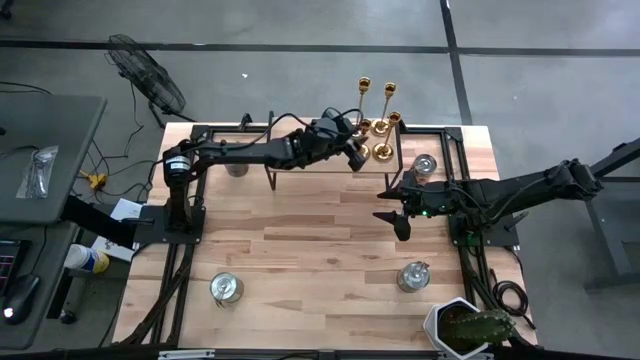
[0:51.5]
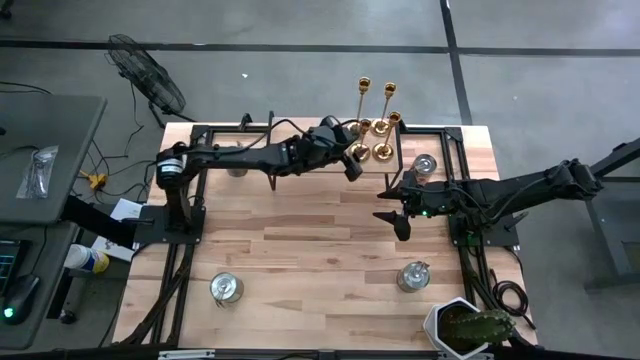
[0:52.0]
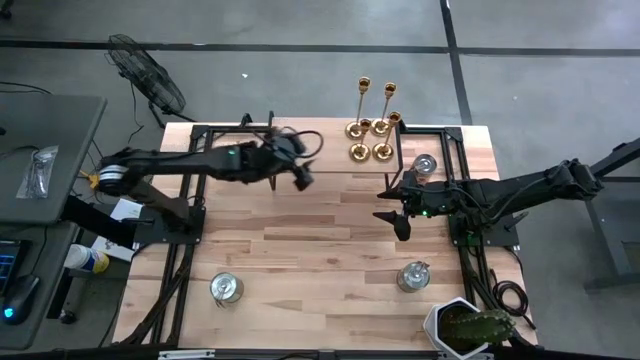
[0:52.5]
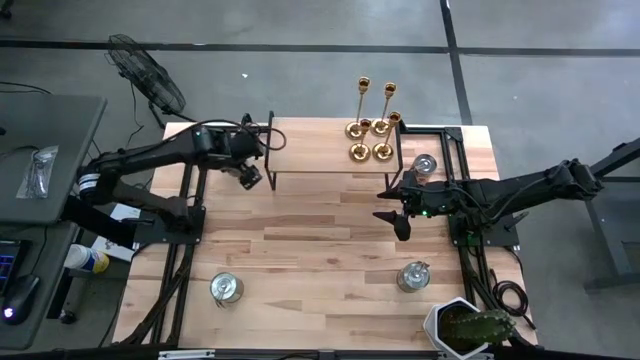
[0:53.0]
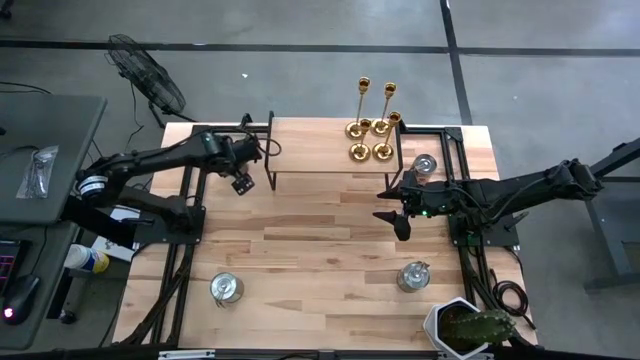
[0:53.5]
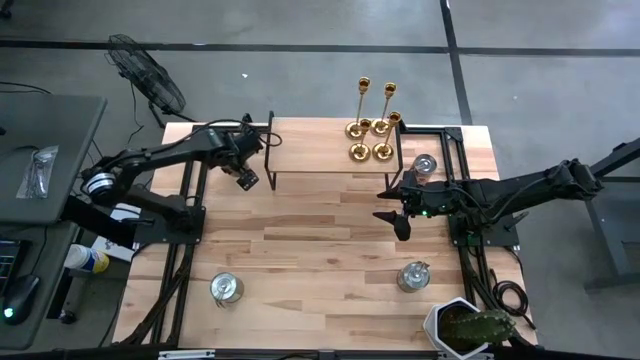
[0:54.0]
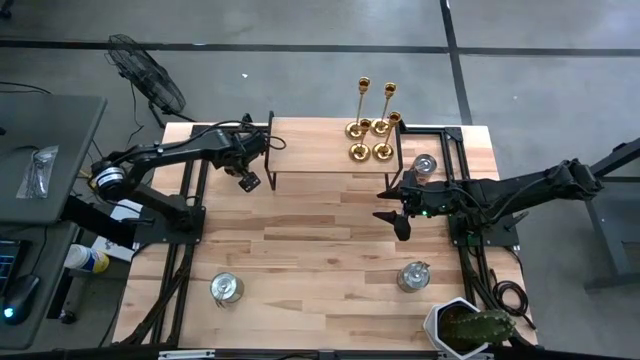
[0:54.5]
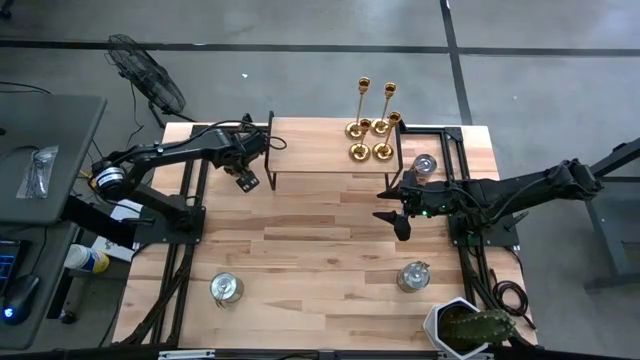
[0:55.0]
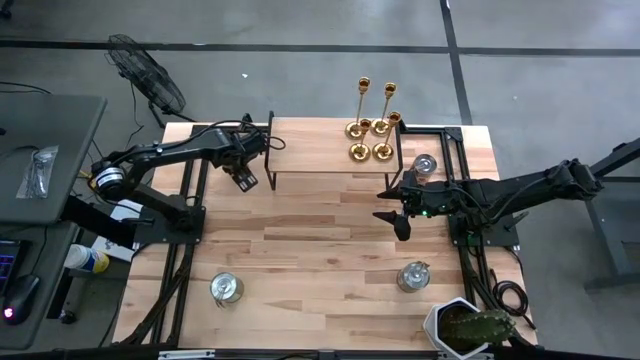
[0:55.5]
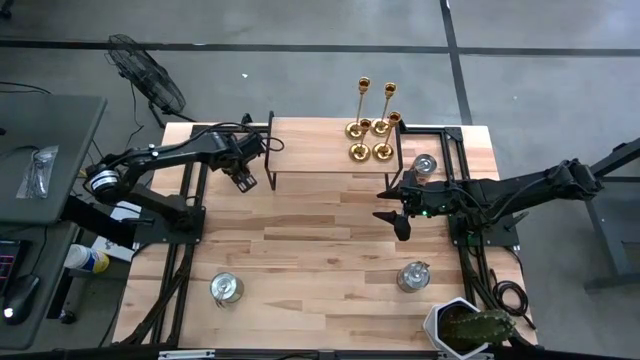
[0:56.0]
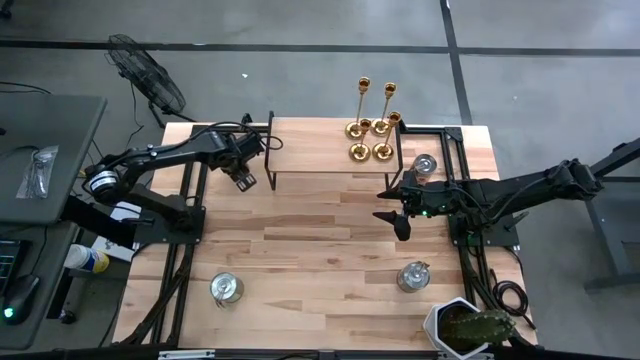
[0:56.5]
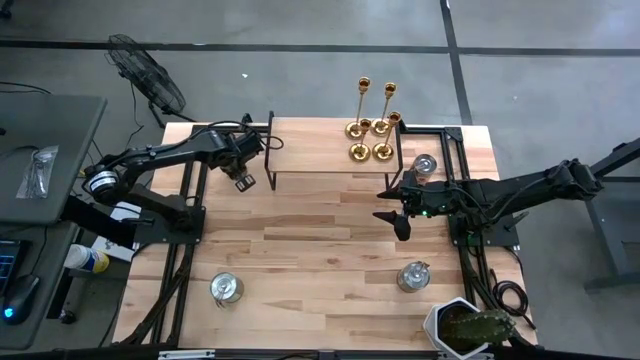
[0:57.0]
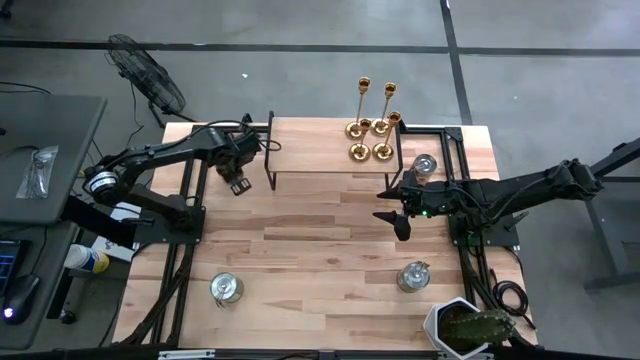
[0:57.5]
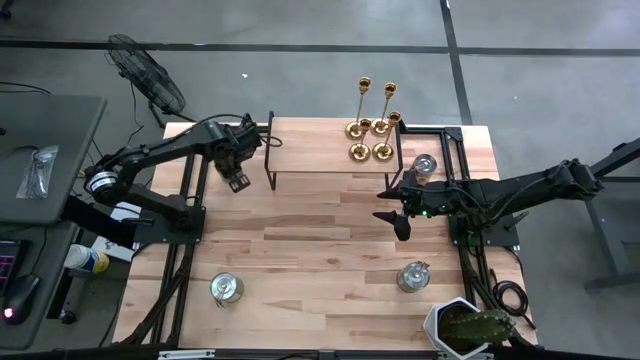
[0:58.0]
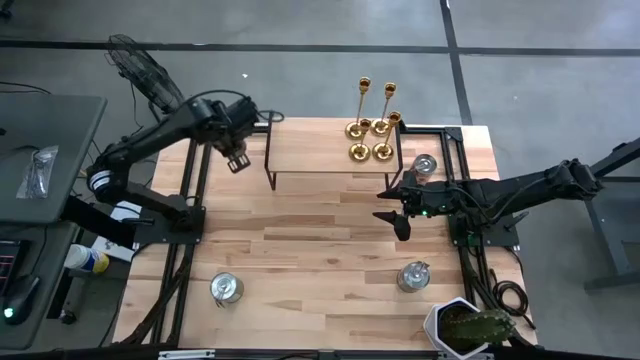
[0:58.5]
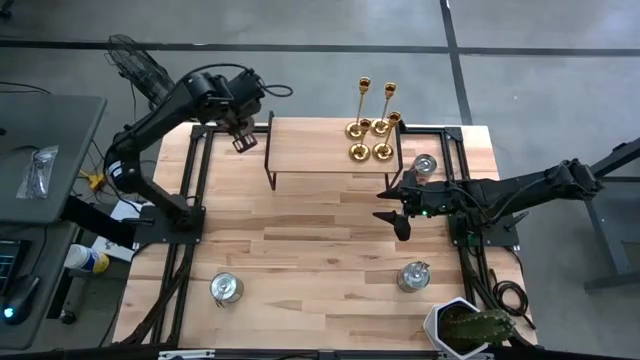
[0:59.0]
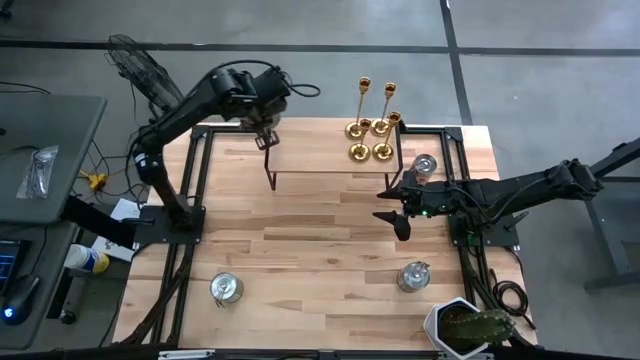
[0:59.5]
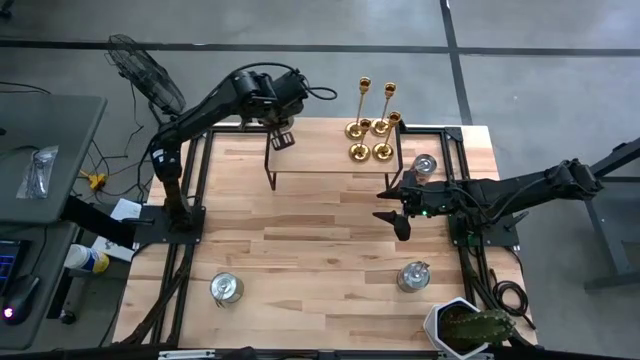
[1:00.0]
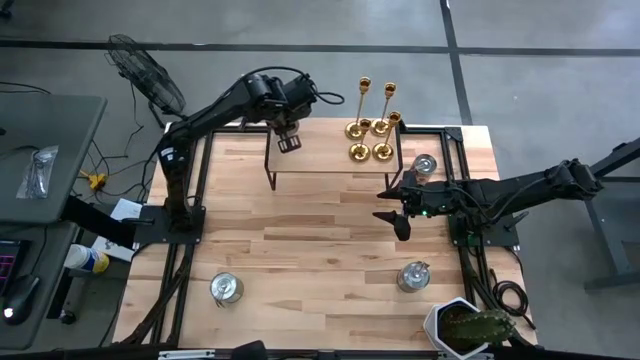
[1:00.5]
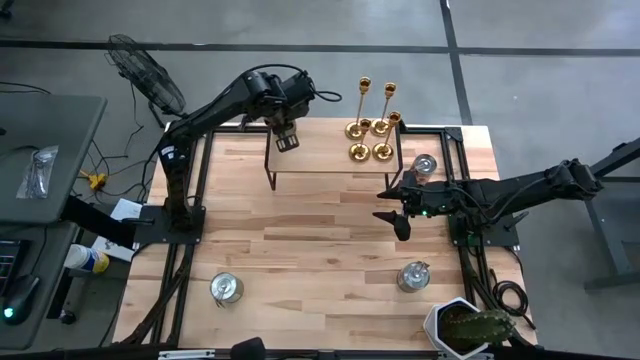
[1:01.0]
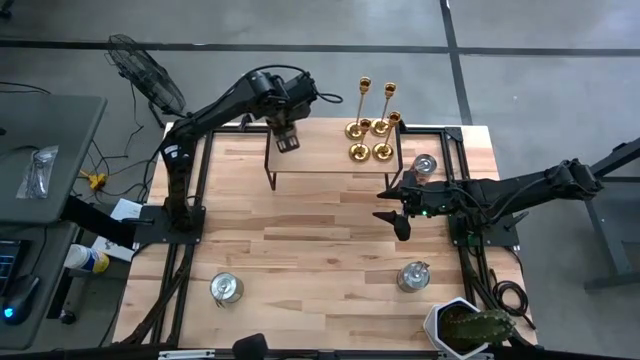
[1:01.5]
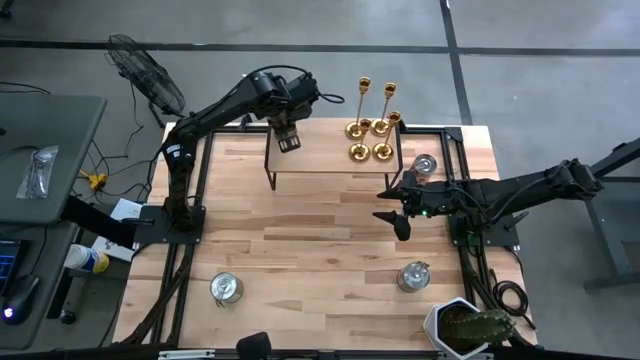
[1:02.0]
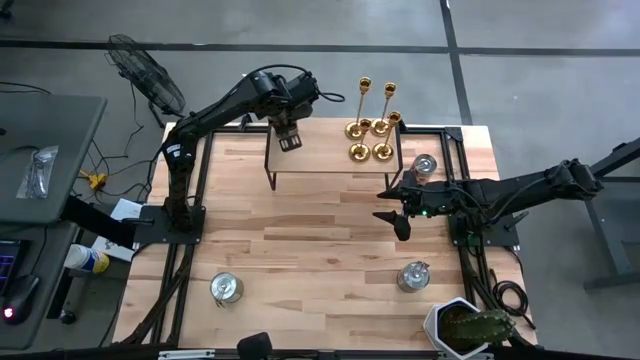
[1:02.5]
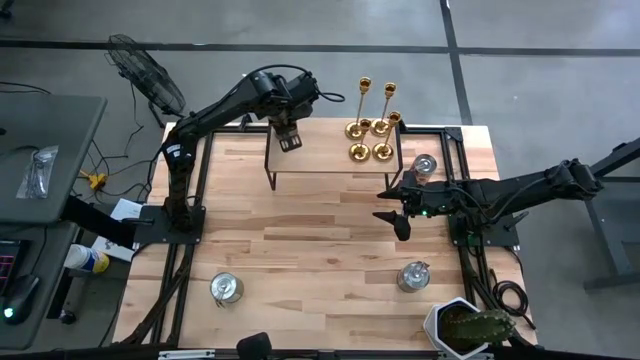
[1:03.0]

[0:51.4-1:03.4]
Task: Pick & Place candle stick holders
Put the silver scented candle on the shelf

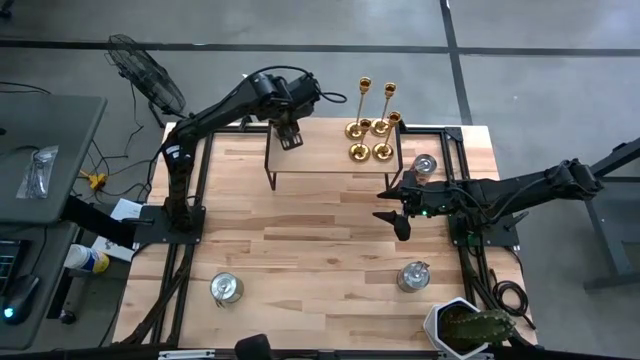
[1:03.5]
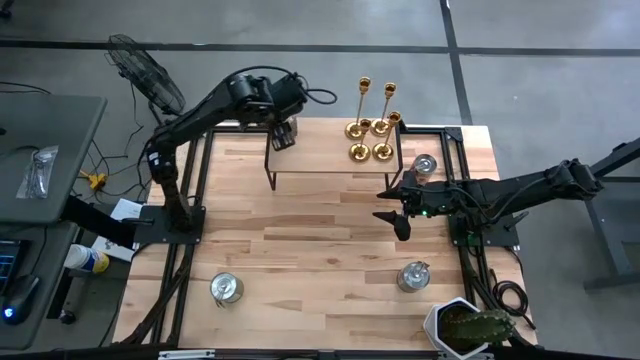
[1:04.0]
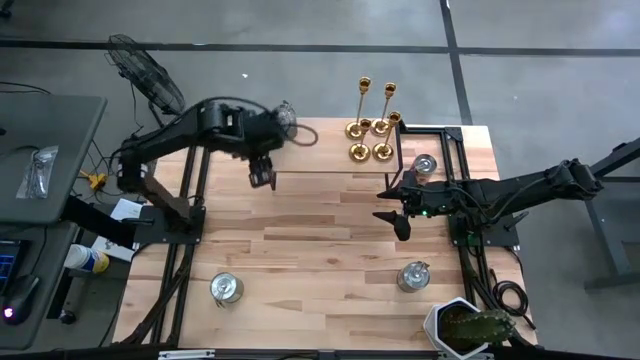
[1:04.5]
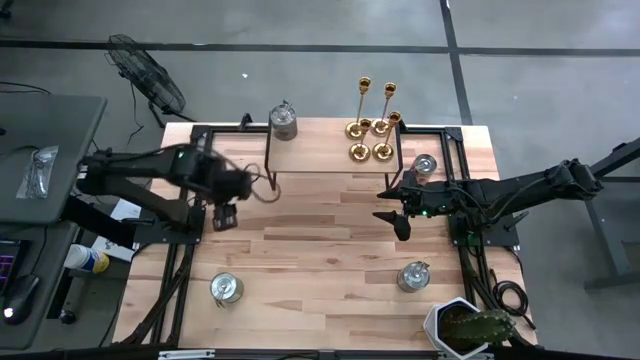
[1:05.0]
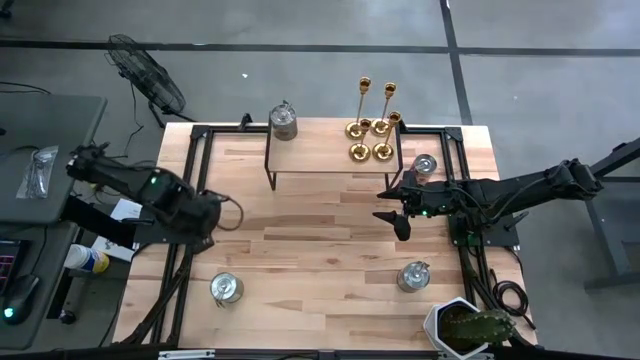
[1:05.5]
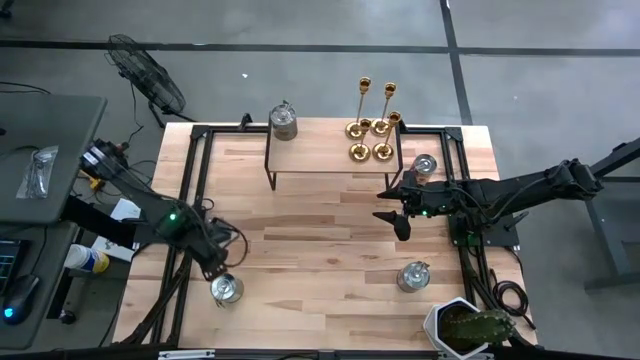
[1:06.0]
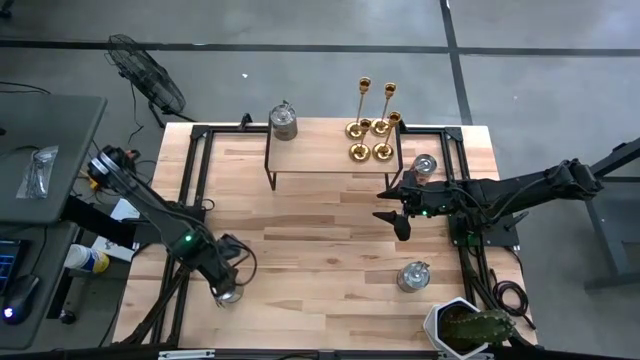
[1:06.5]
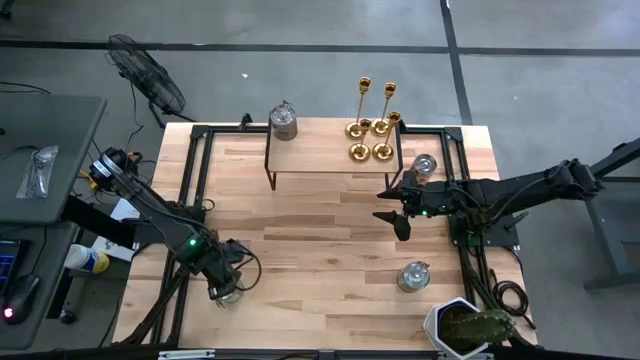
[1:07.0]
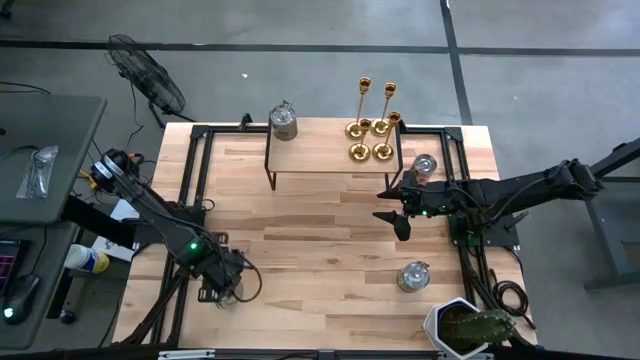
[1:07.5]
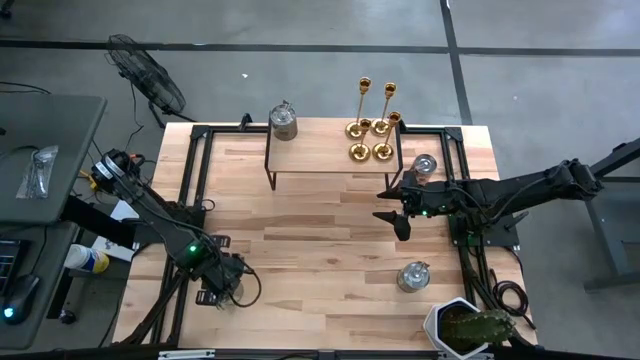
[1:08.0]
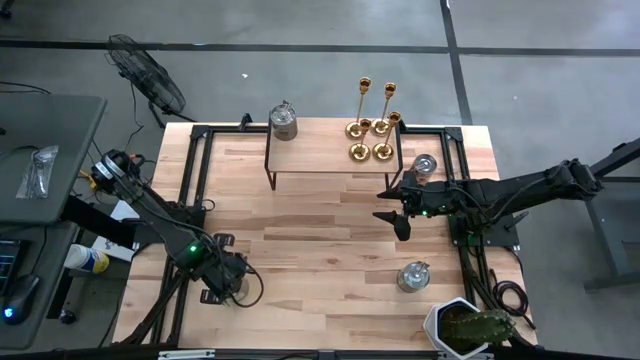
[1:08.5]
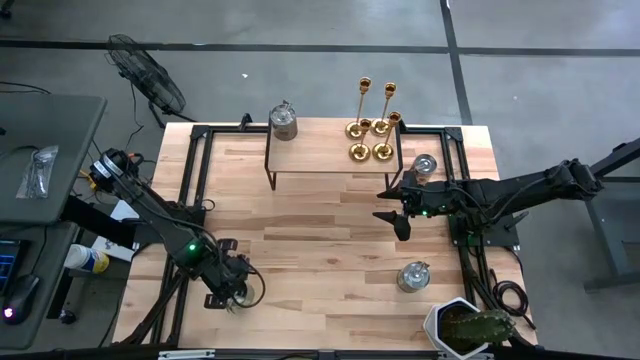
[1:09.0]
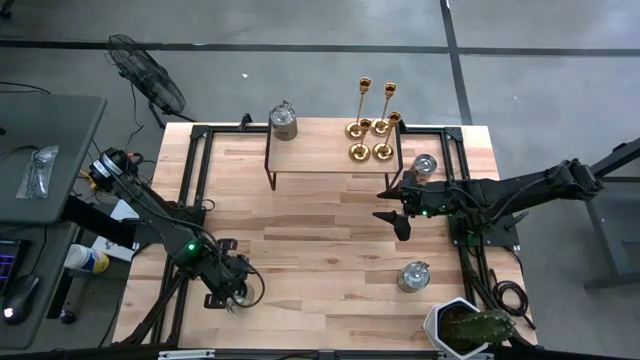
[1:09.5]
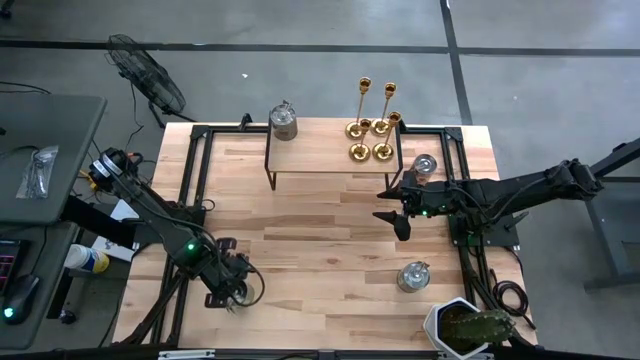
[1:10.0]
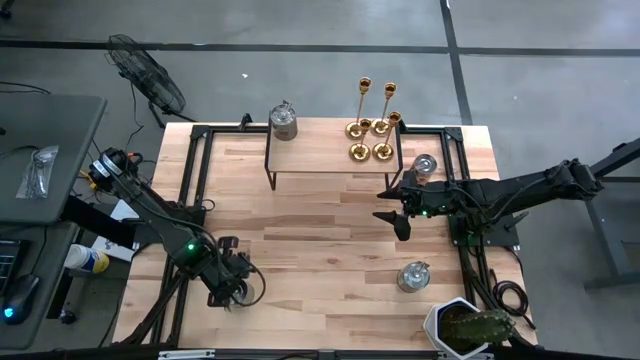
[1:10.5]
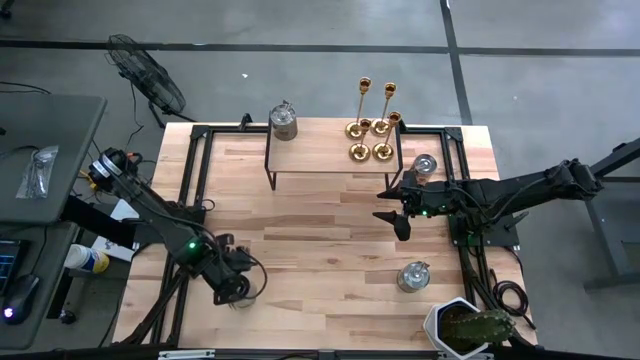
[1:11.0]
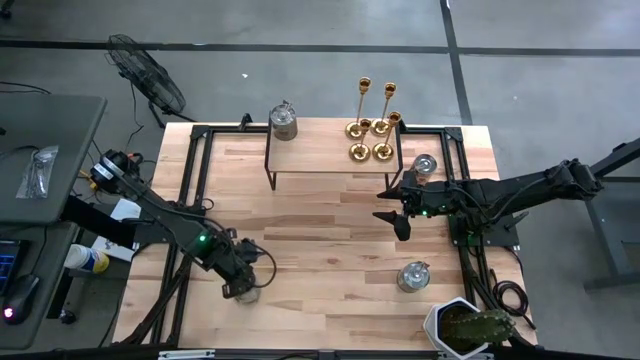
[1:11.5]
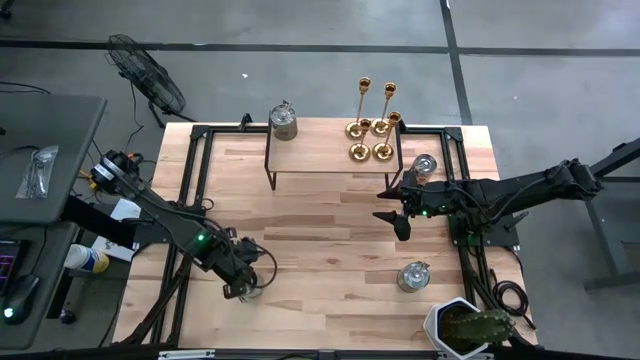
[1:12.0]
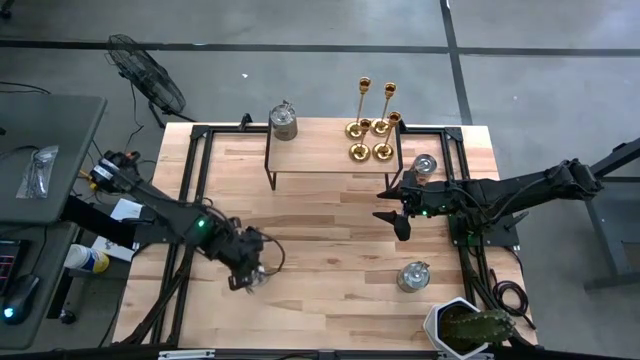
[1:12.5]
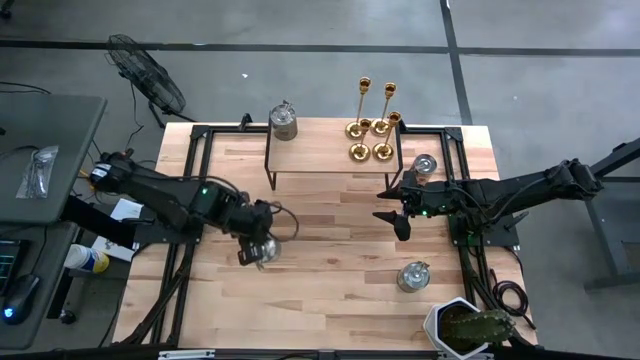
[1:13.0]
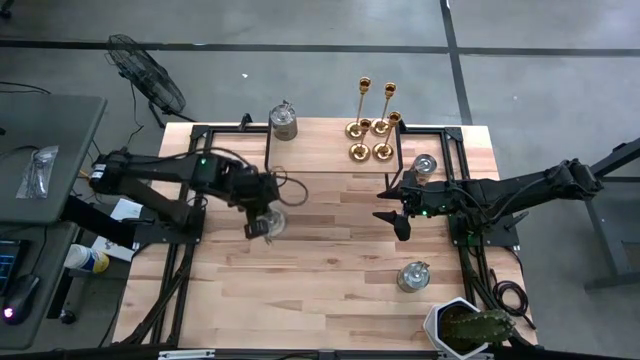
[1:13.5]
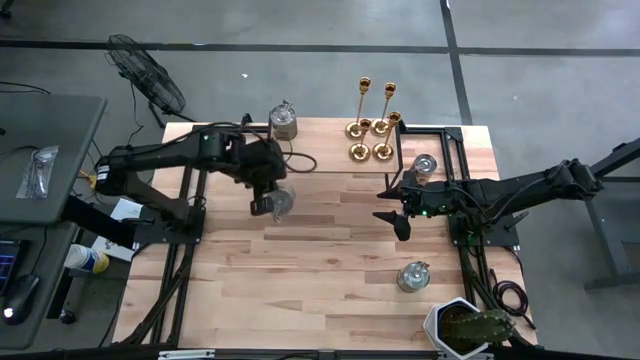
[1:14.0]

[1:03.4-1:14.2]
Put the silver scented candle on the shelf
